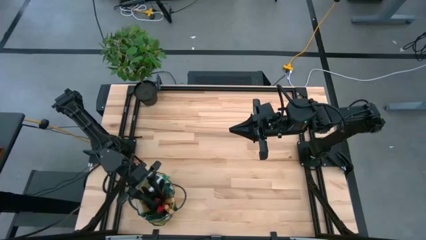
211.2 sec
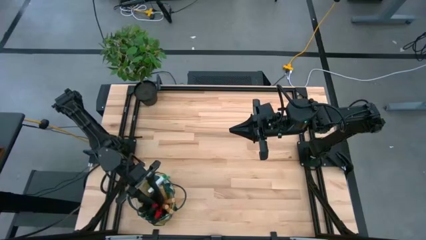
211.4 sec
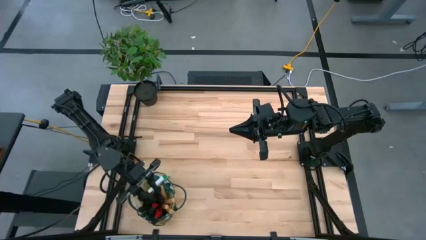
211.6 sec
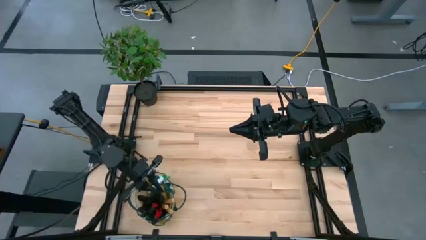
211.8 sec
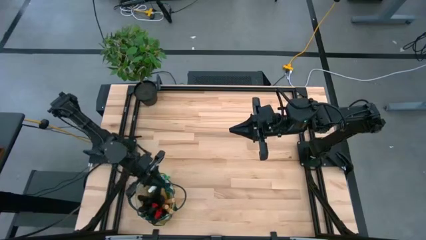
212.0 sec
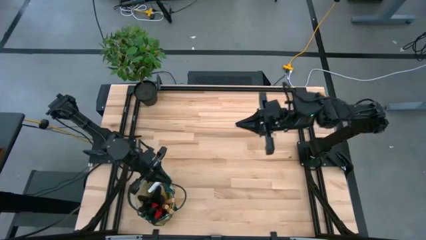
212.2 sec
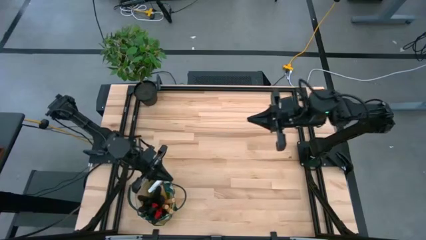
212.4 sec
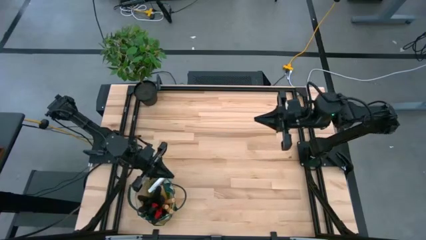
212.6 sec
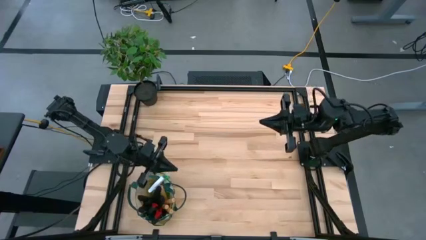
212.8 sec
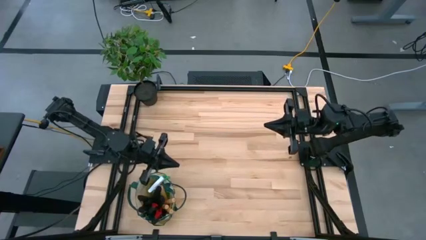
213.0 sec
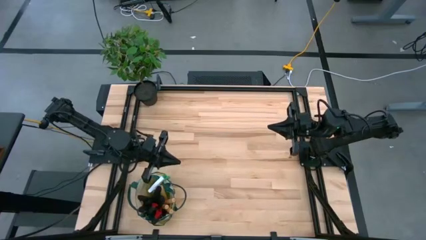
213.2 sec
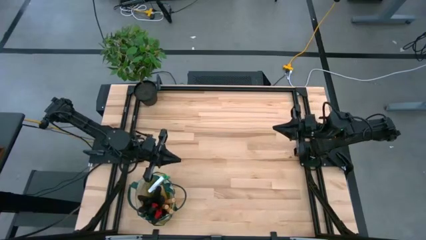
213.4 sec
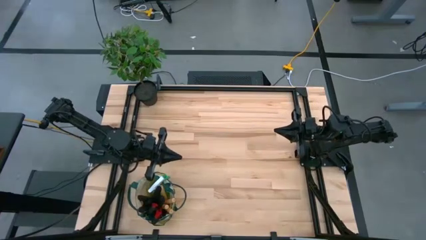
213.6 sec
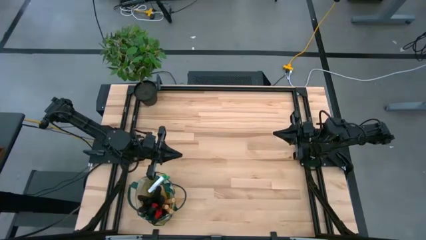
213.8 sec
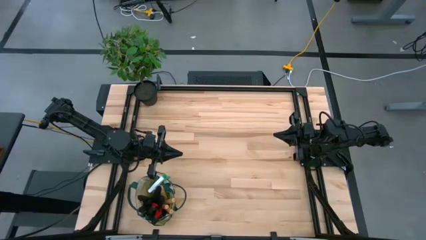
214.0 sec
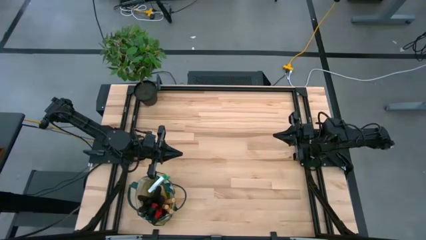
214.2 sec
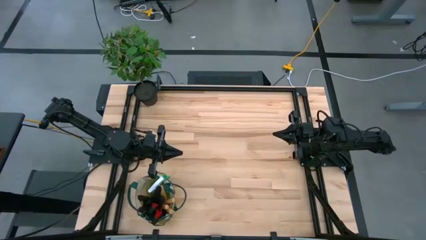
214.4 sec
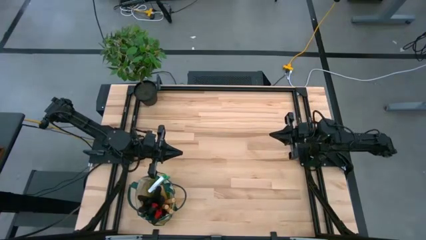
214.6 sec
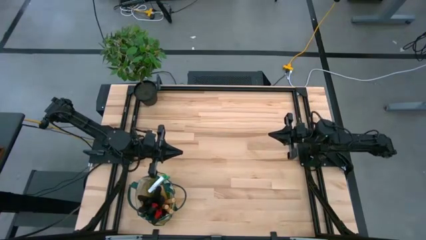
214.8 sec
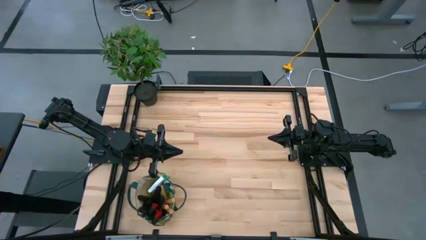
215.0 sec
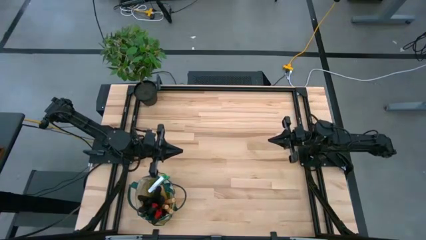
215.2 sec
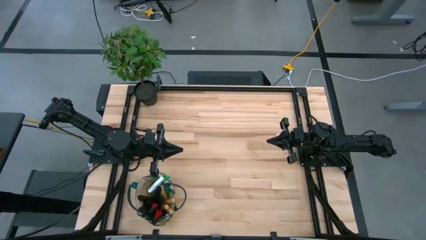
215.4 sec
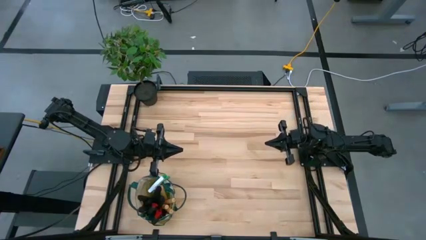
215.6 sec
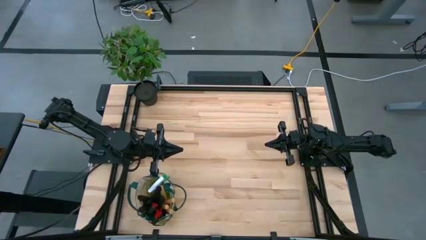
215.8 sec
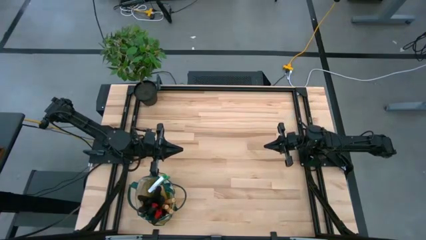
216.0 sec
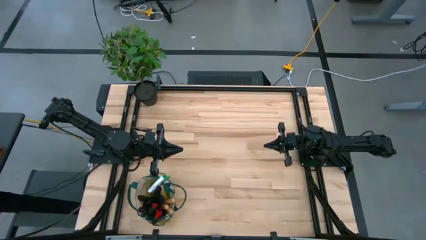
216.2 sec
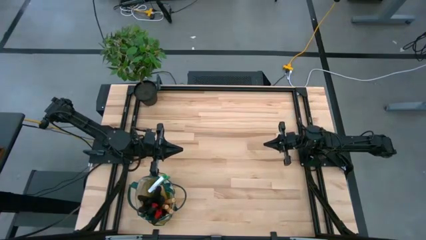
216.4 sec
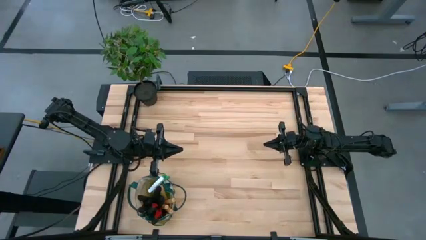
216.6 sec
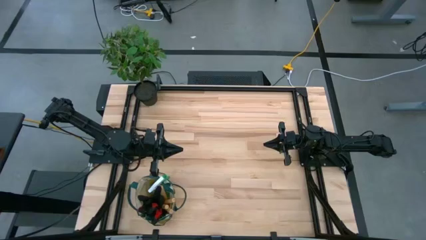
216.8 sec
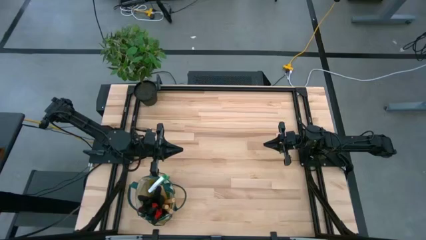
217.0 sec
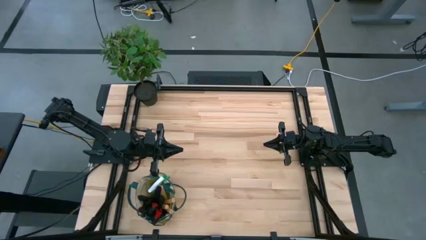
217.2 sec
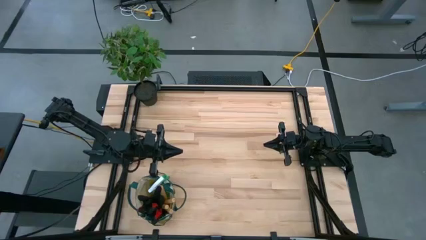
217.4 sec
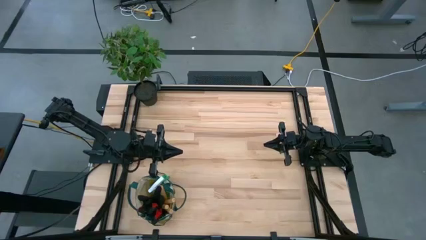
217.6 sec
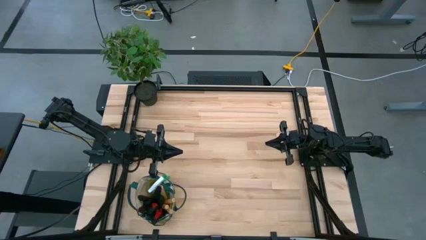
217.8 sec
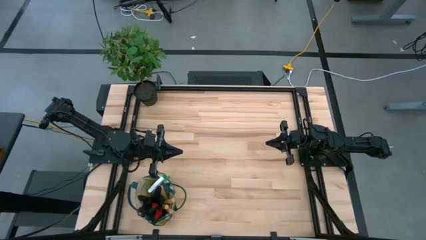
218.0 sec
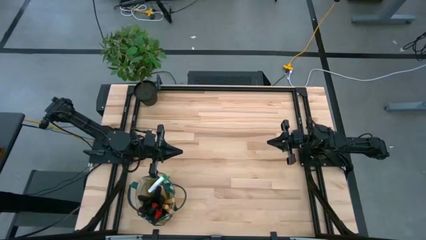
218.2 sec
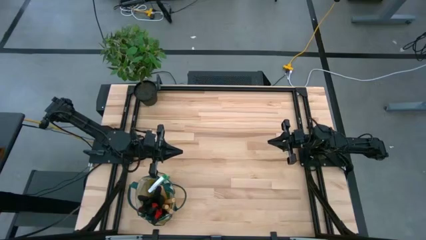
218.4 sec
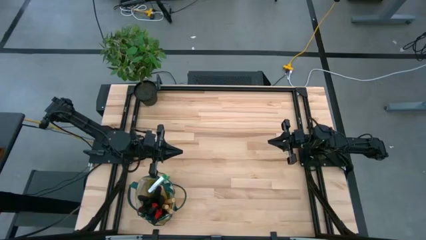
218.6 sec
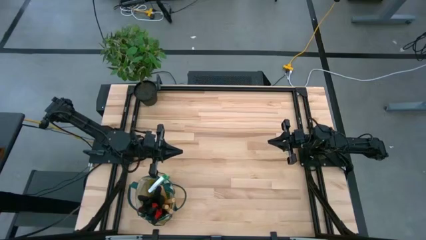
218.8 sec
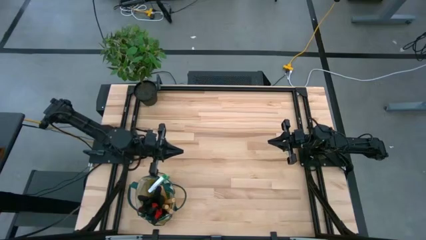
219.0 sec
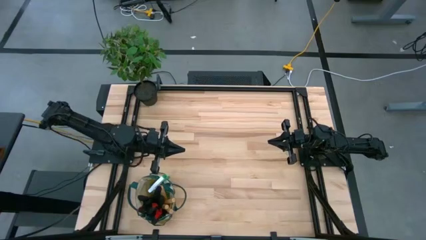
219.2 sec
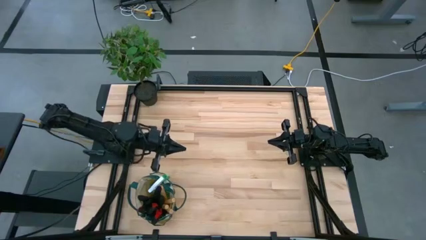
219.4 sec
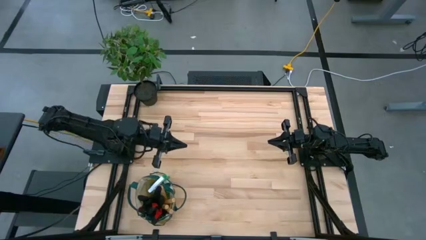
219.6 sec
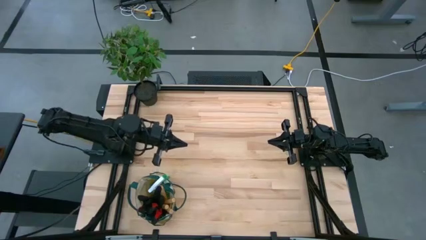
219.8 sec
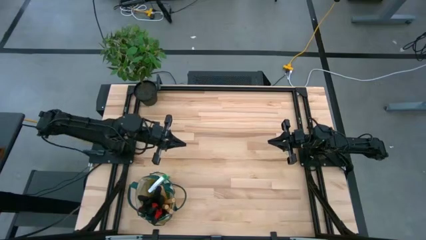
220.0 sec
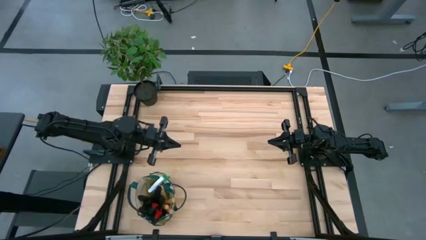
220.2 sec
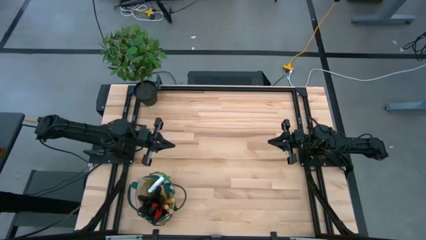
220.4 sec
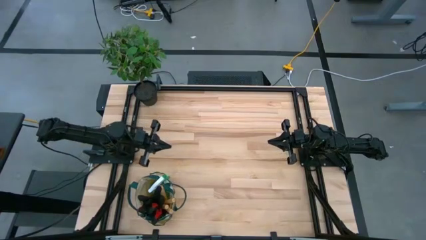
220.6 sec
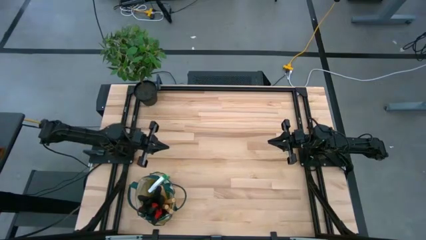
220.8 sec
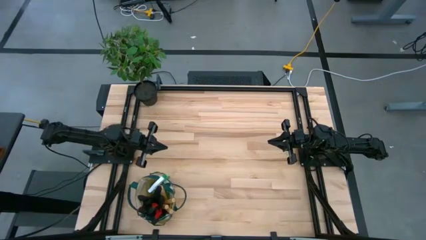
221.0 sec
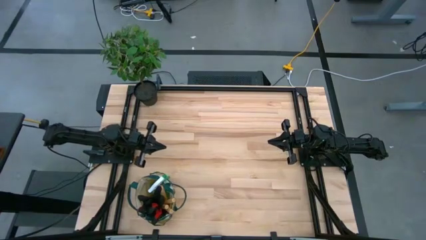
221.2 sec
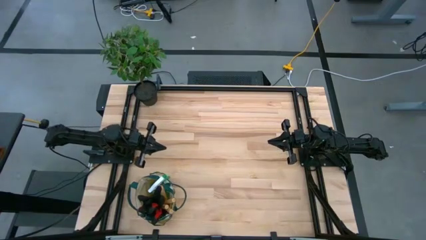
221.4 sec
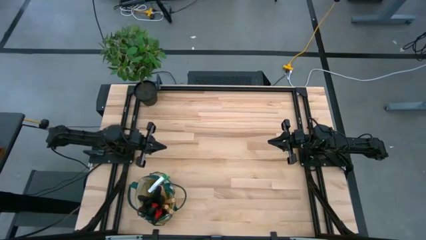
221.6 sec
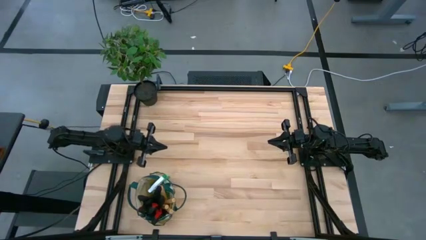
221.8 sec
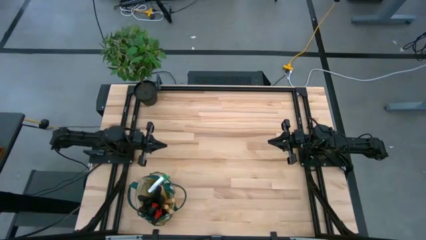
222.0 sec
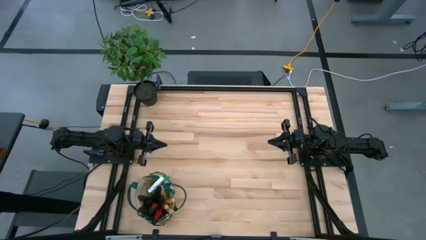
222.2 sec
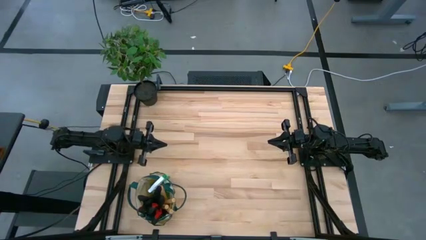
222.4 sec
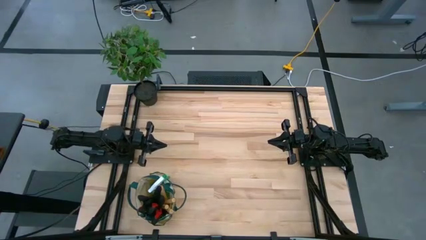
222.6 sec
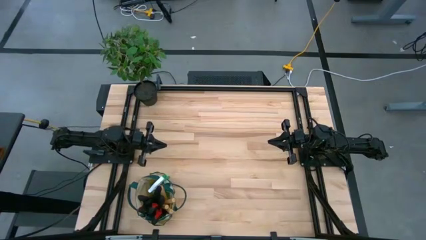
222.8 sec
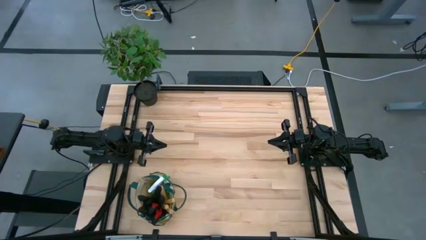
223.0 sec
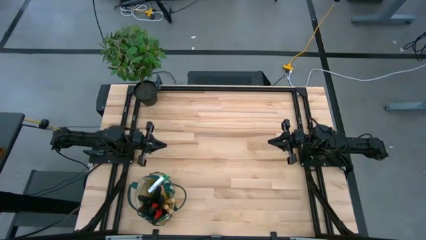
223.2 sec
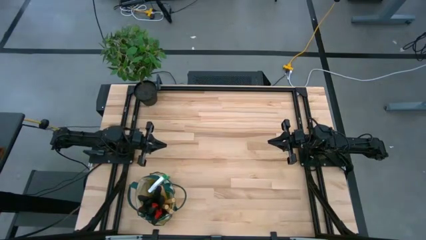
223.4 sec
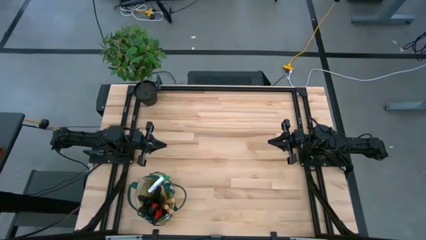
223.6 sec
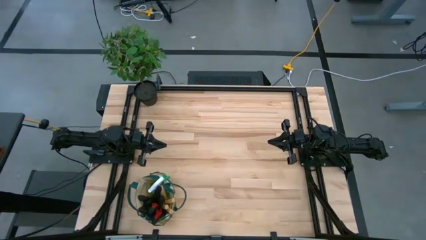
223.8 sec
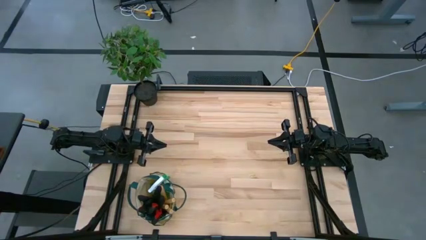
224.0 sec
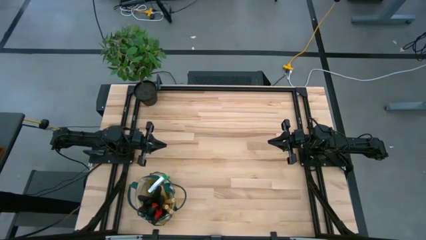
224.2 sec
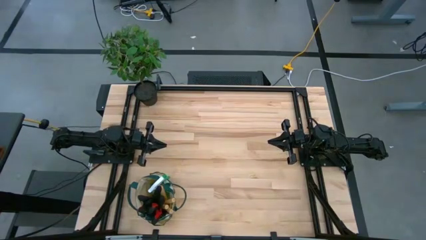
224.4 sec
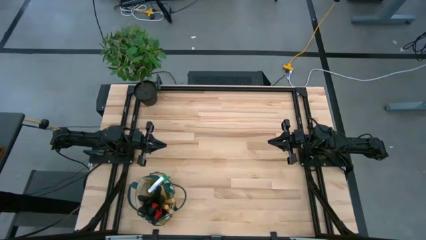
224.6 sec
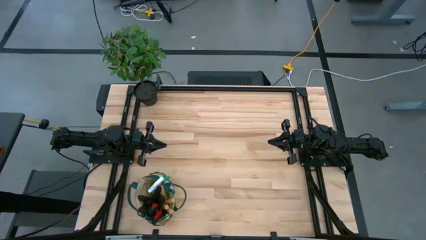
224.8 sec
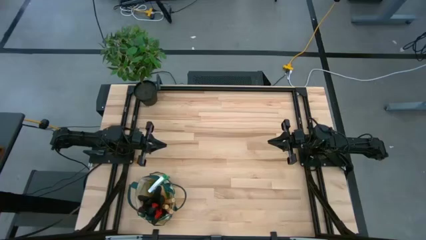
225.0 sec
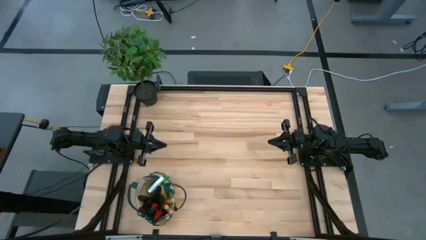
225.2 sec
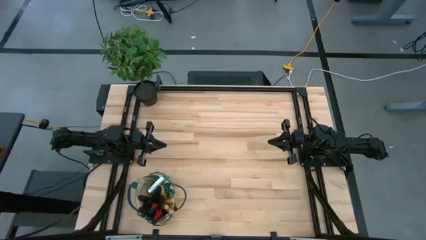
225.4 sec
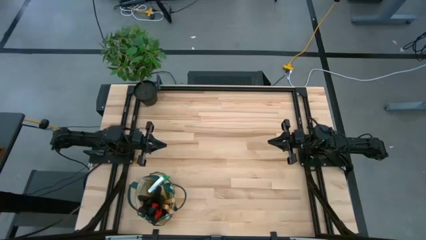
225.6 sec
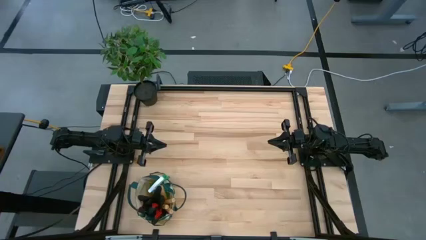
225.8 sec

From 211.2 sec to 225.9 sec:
Task: Pick & Place Garden tools in Gardening bag
Return to Home Position
